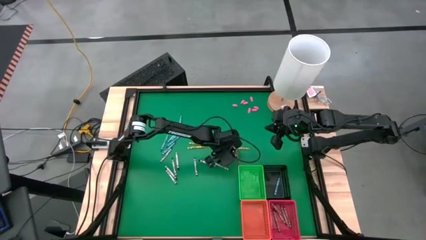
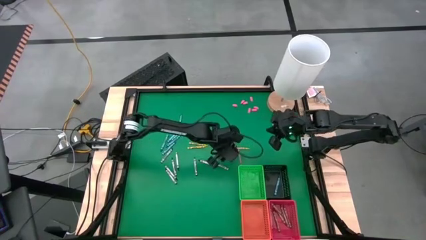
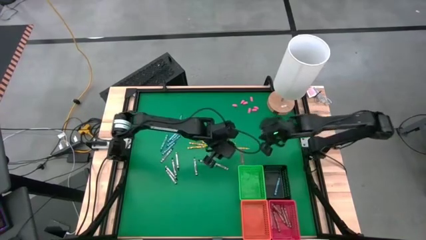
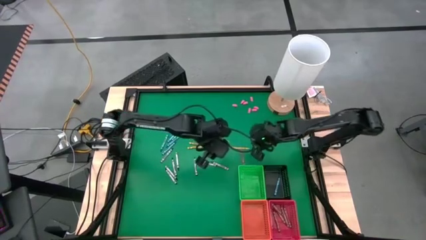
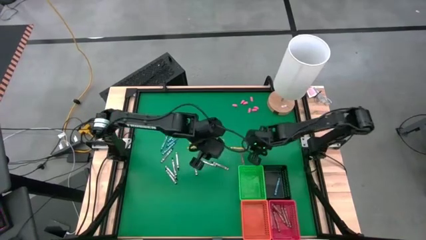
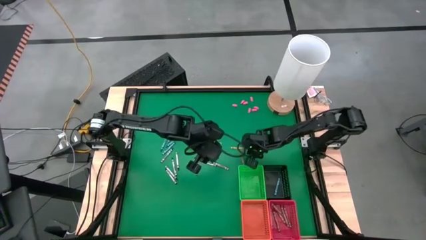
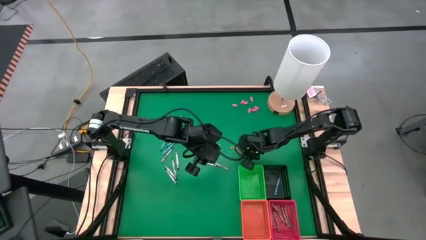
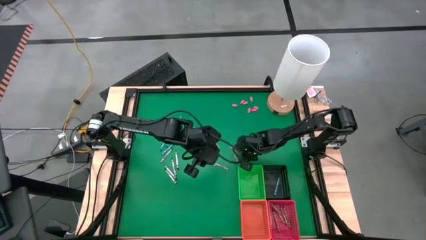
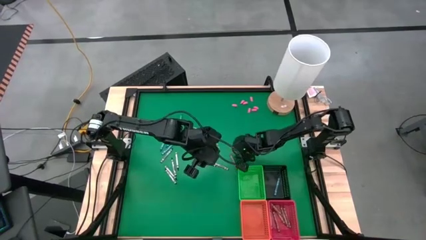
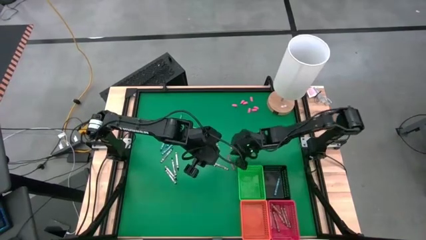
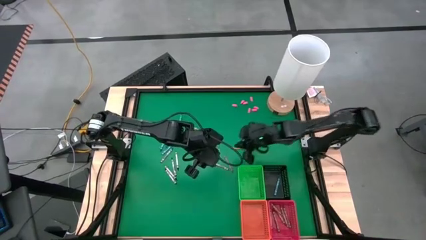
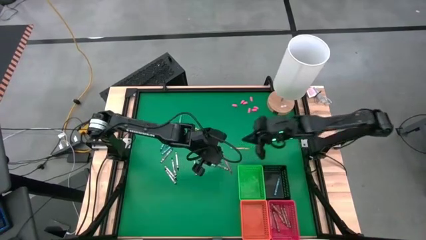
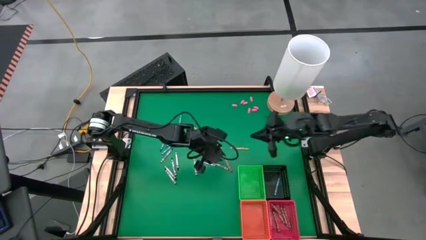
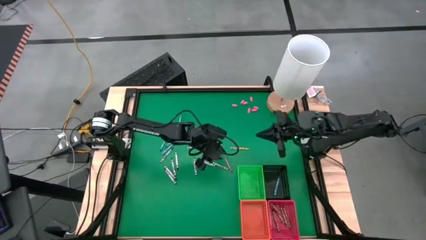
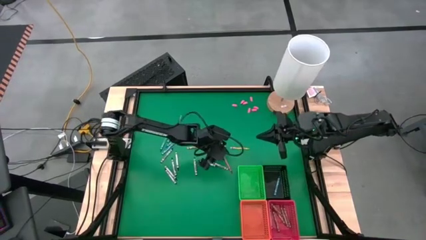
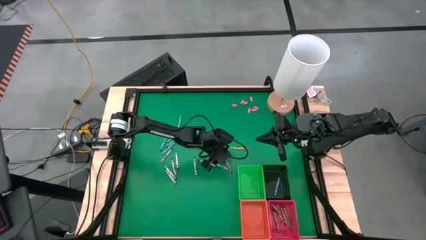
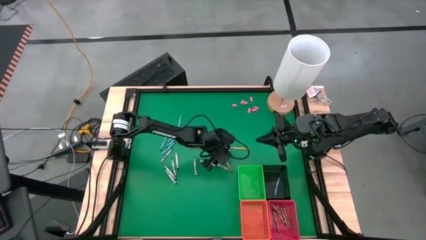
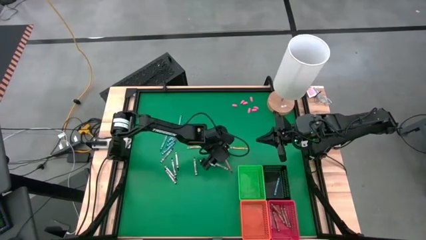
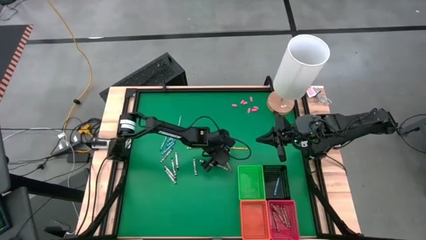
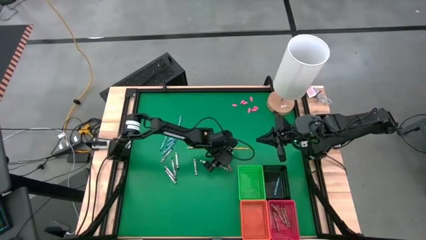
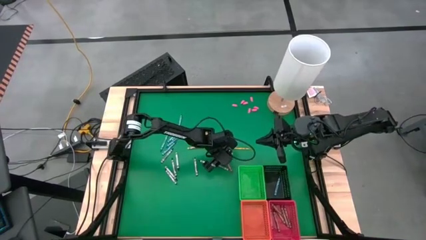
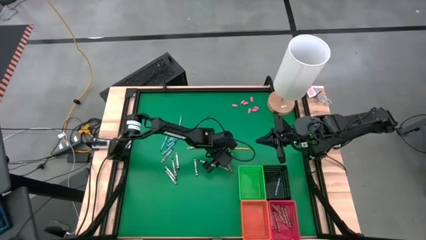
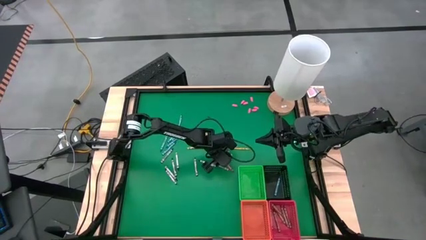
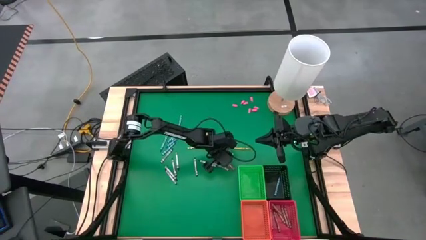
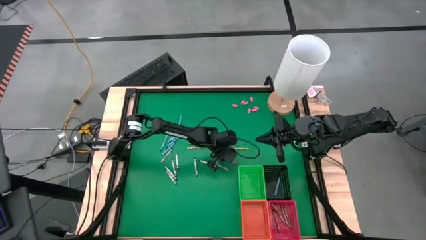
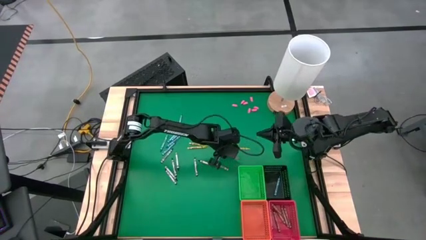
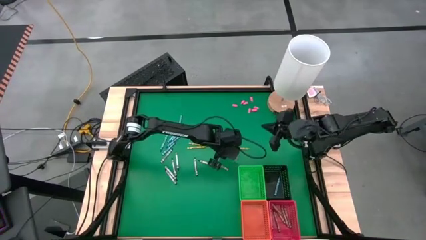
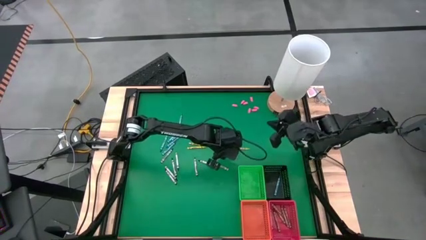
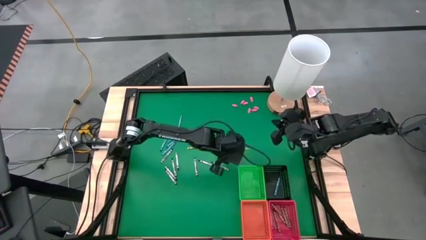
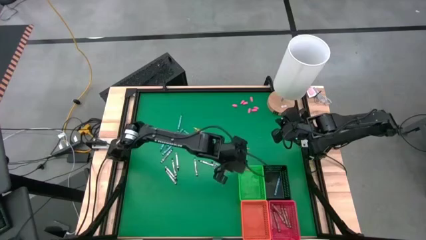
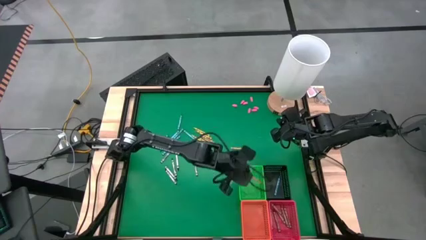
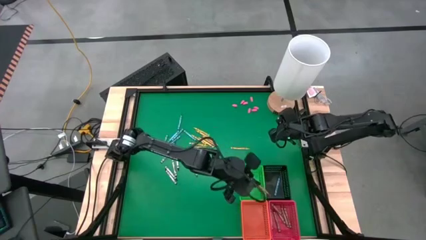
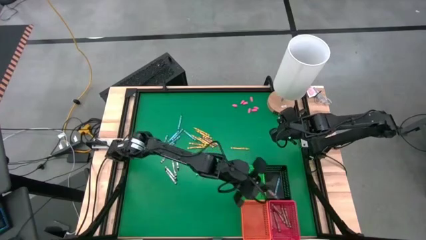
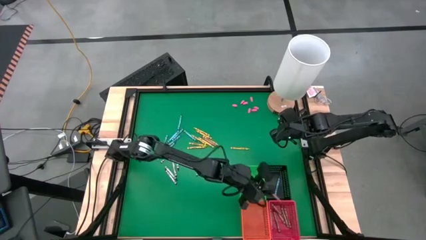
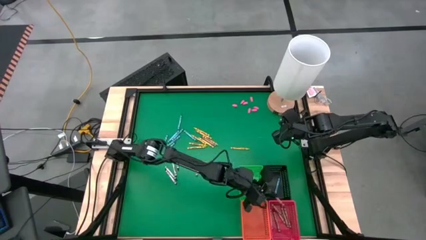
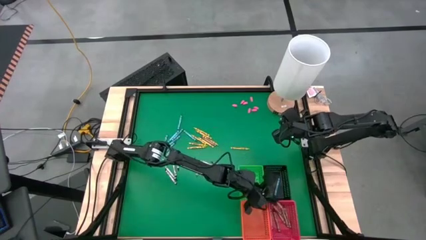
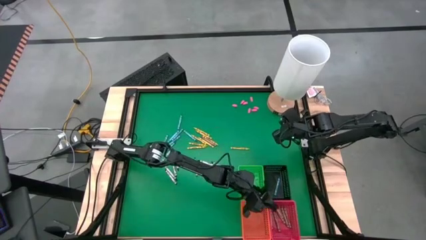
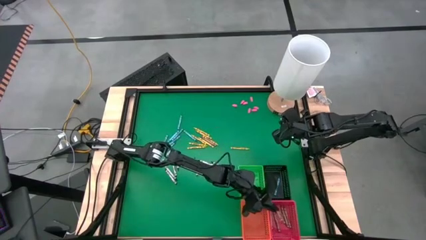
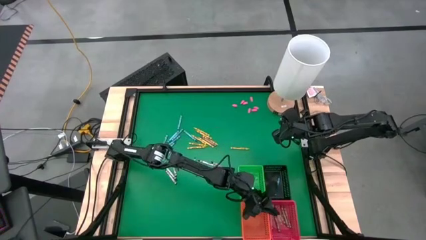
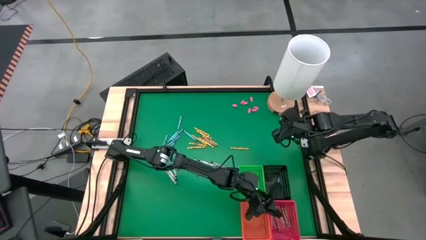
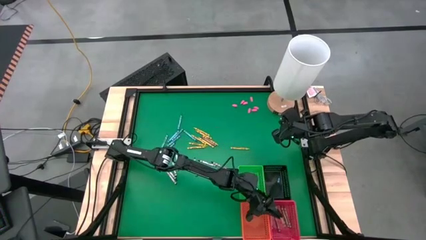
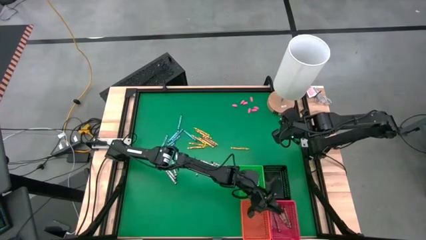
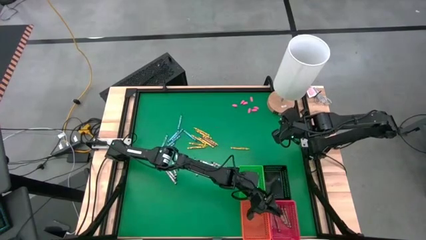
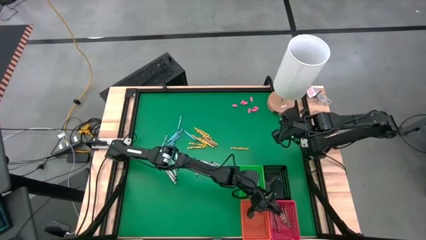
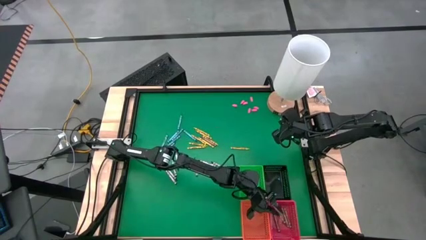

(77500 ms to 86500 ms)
Task: Sort crayons
Put the brown crayon into the red bin

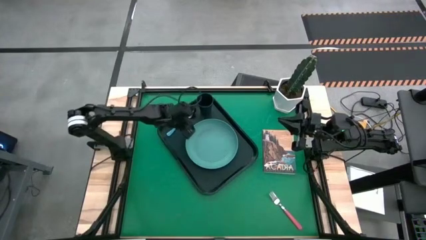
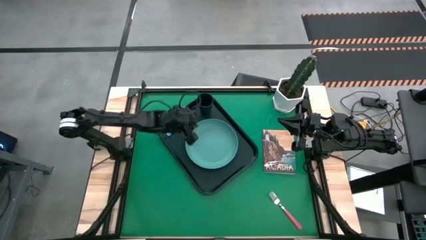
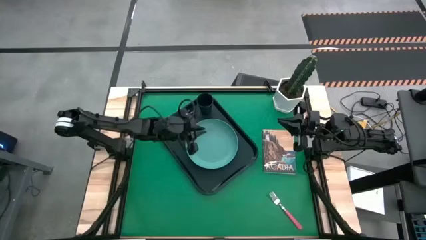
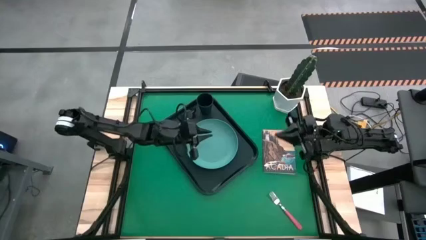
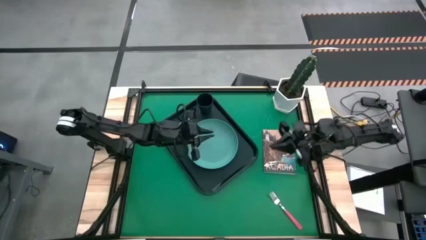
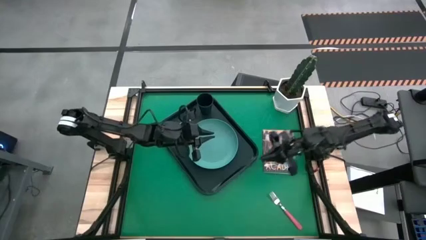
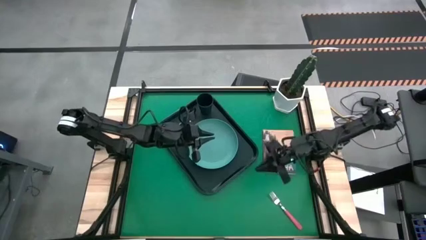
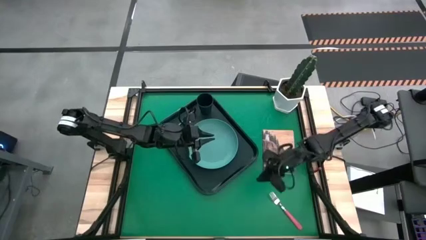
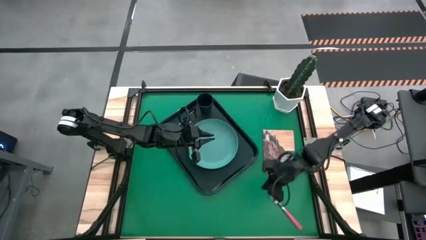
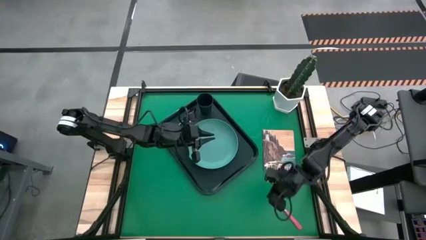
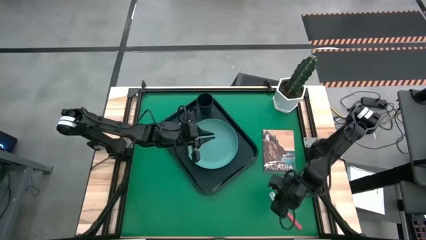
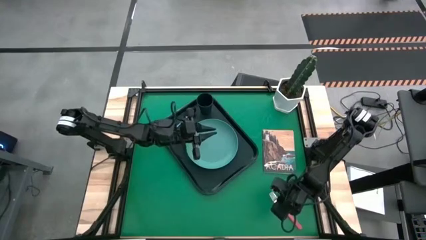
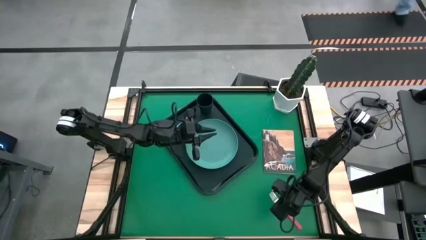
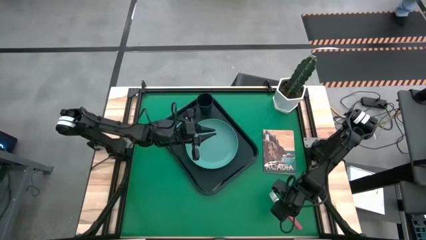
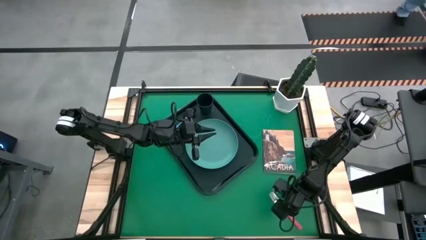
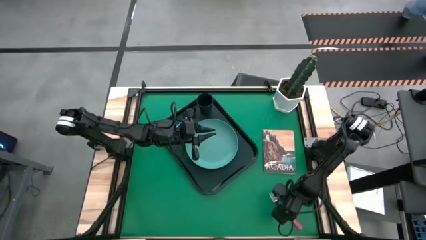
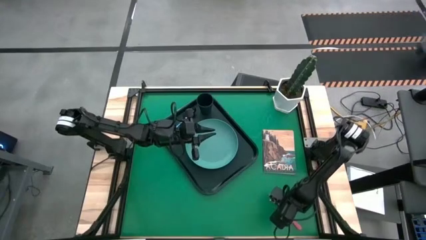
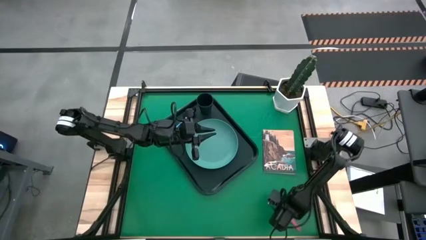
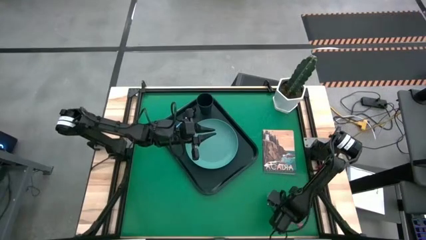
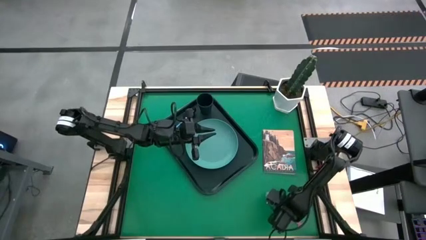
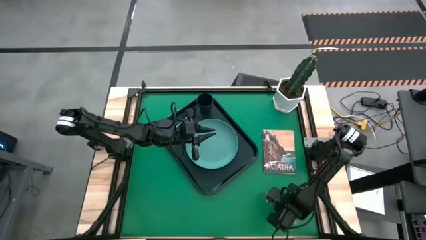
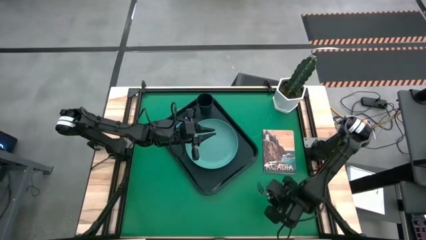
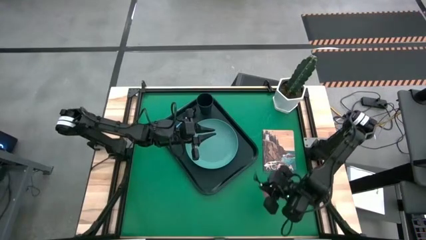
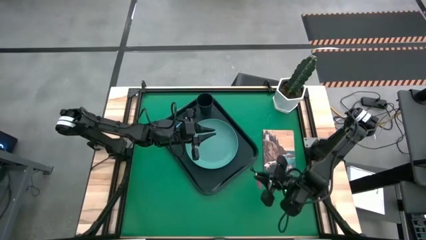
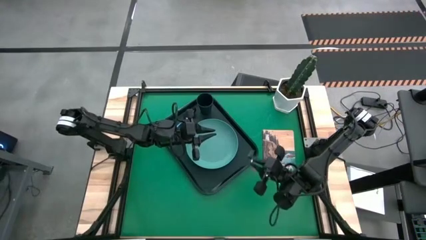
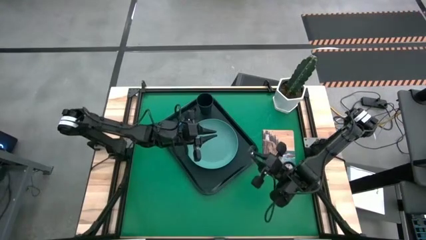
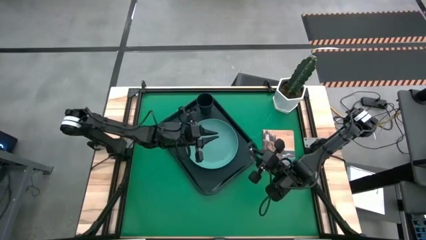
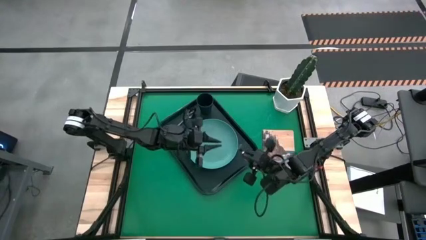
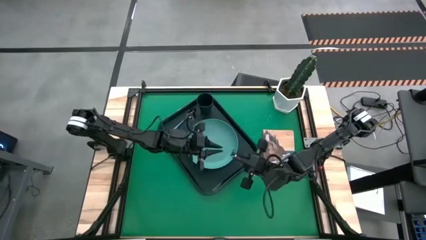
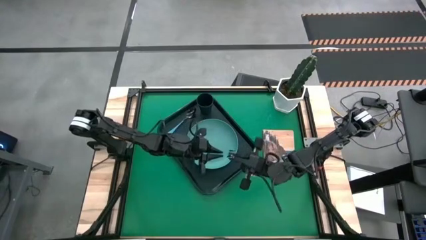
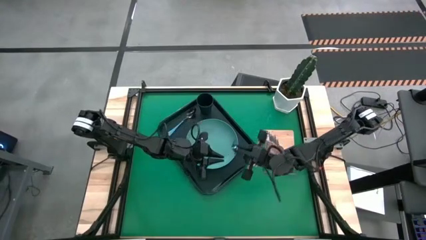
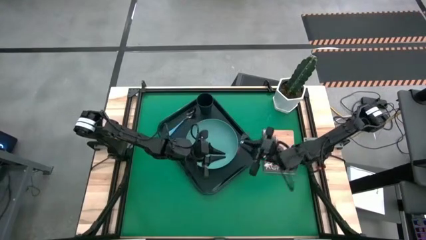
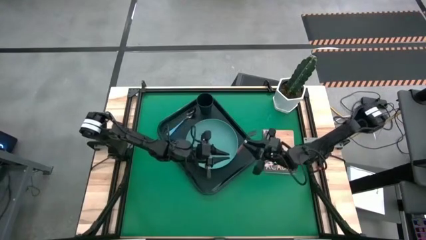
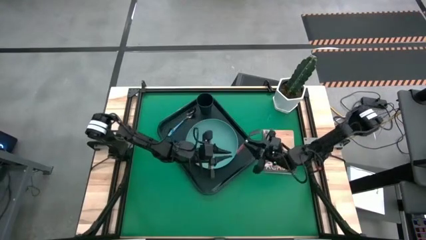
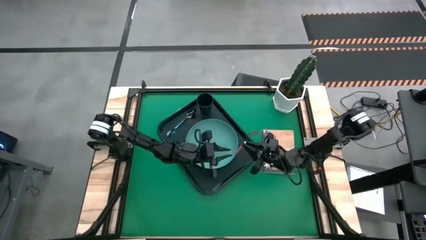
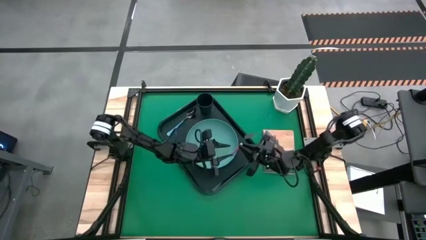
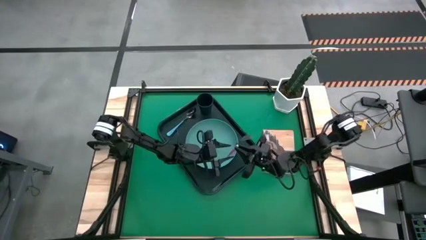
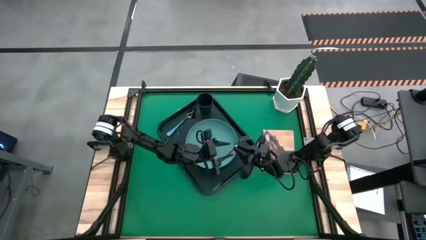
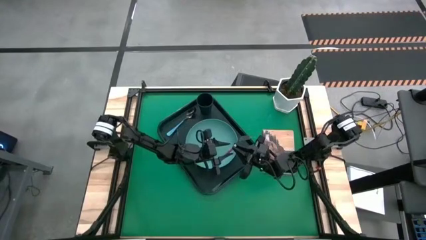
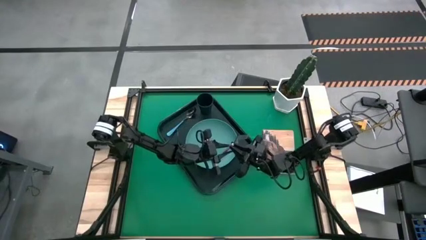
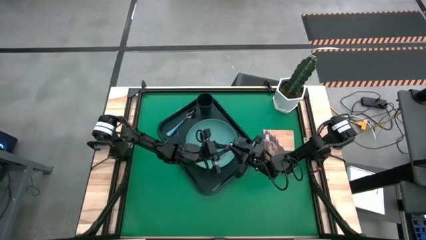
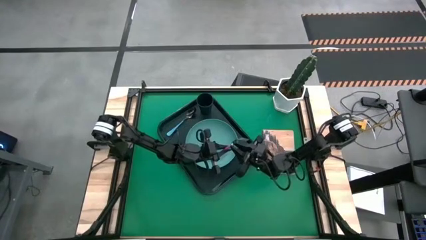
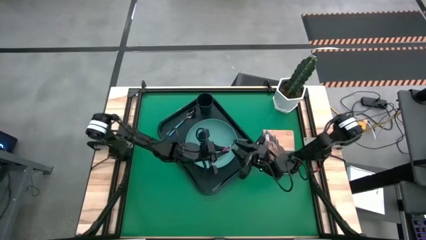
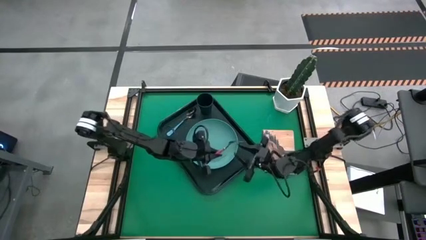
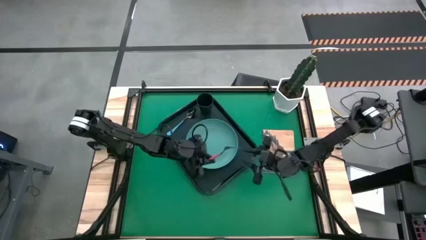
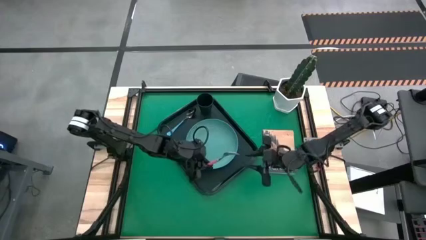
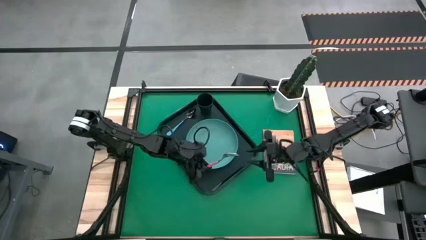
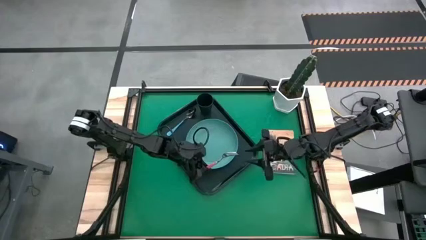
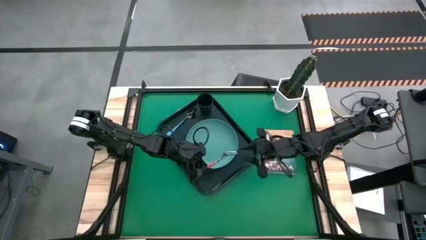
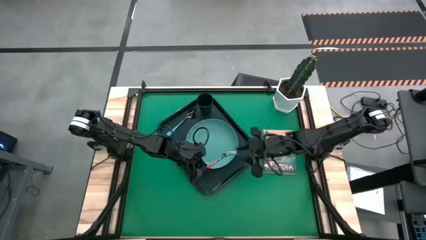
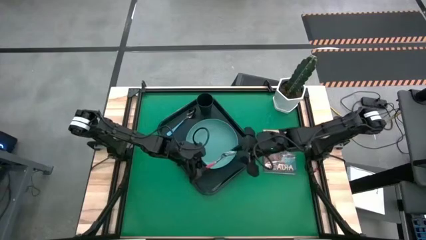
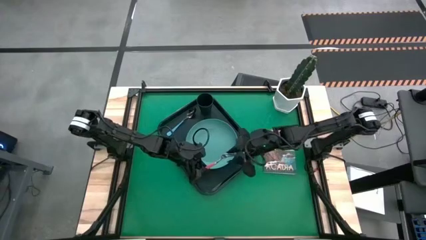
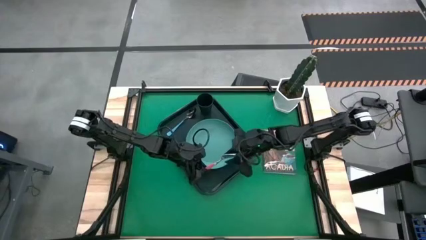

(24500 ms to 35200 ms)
Task: Pick and place plate/cup/fork/spoon on tray
Put the pink fork on the black serving tray to the right of the blue plate
